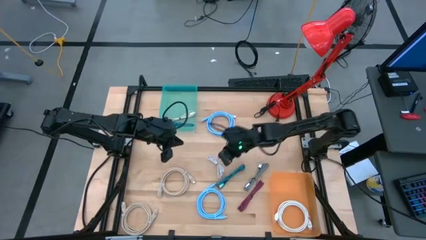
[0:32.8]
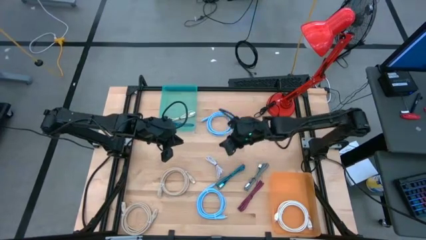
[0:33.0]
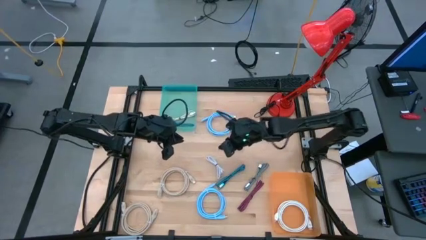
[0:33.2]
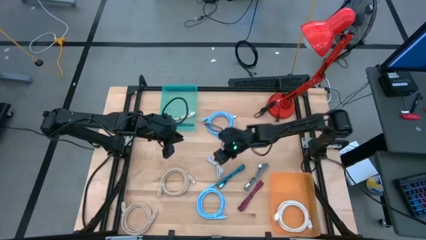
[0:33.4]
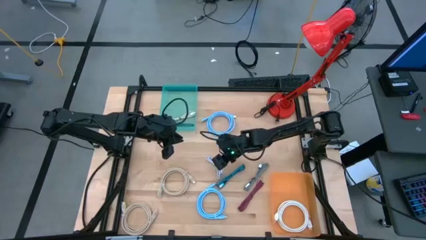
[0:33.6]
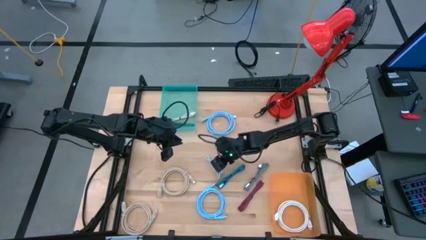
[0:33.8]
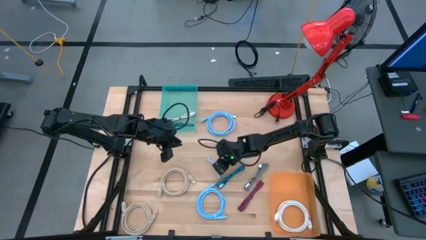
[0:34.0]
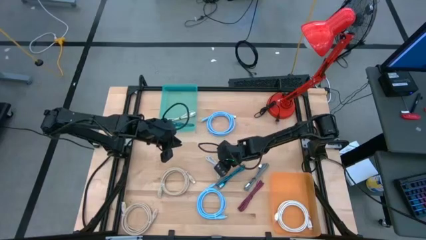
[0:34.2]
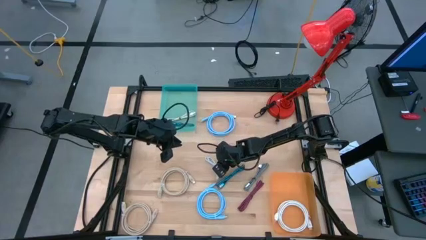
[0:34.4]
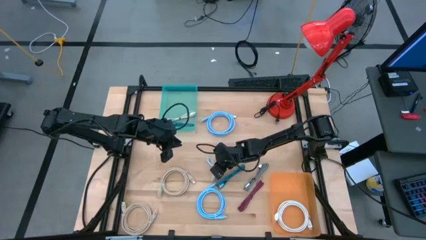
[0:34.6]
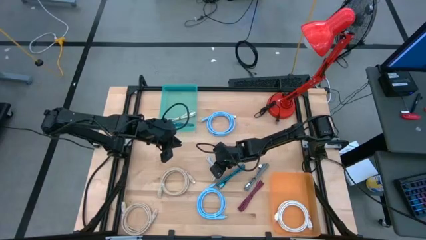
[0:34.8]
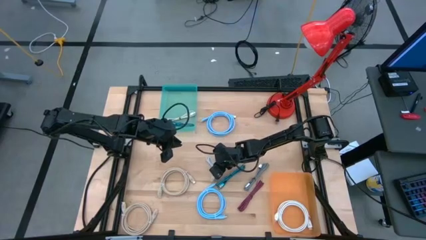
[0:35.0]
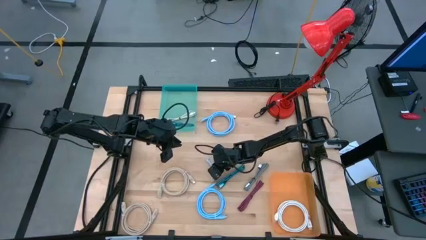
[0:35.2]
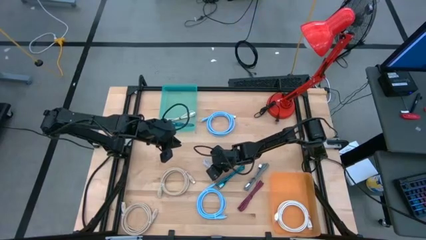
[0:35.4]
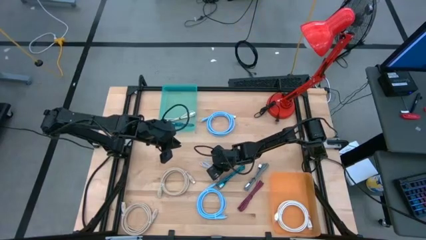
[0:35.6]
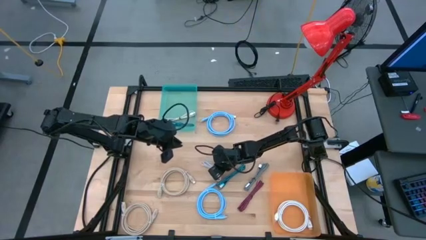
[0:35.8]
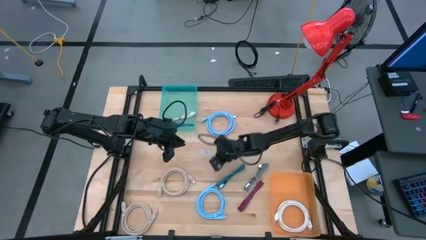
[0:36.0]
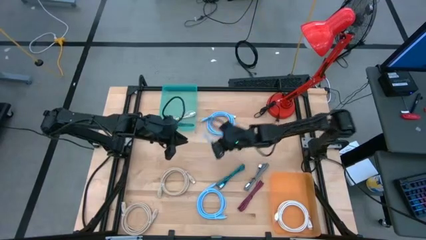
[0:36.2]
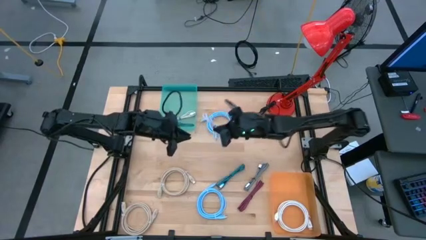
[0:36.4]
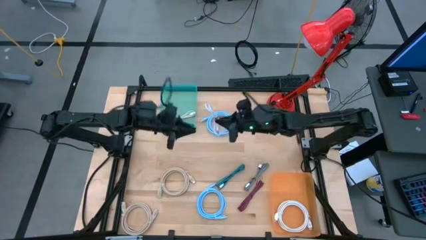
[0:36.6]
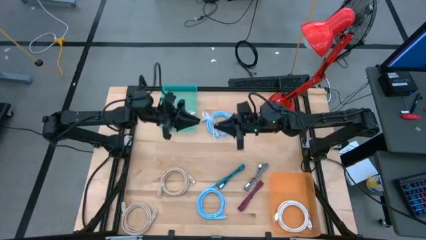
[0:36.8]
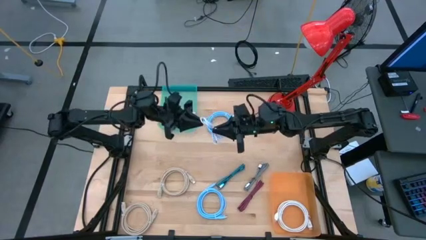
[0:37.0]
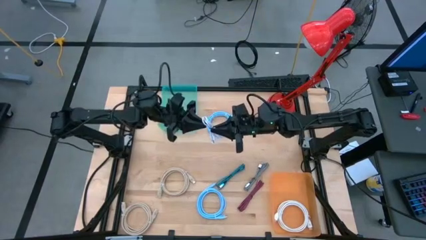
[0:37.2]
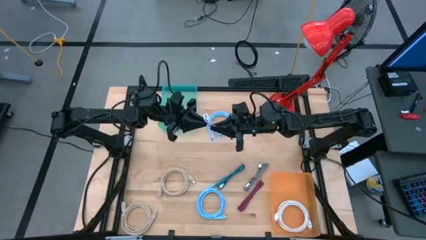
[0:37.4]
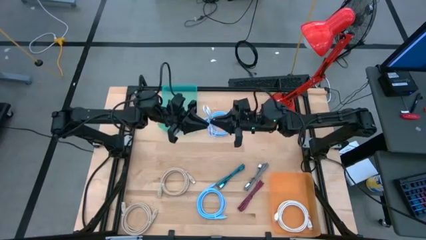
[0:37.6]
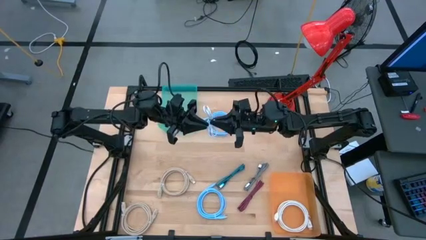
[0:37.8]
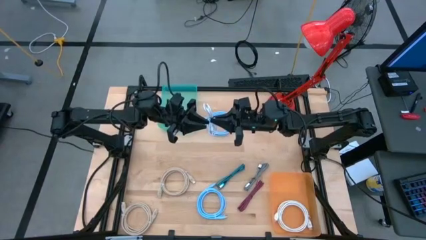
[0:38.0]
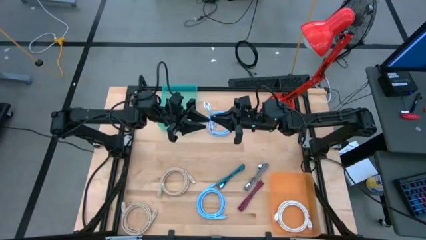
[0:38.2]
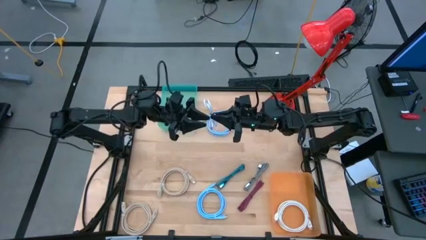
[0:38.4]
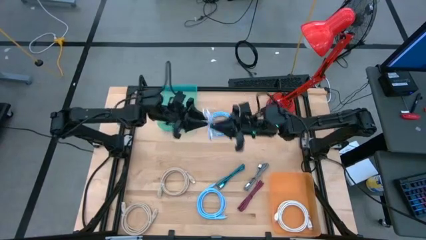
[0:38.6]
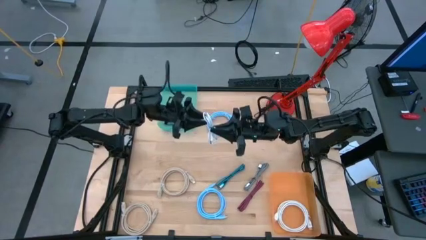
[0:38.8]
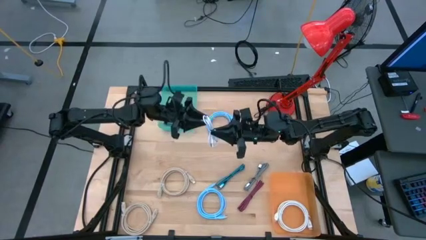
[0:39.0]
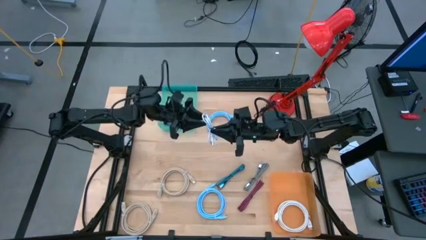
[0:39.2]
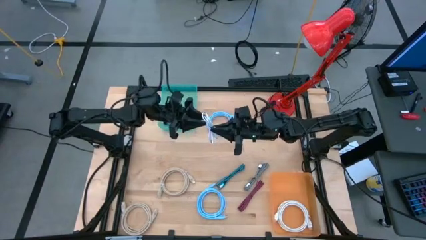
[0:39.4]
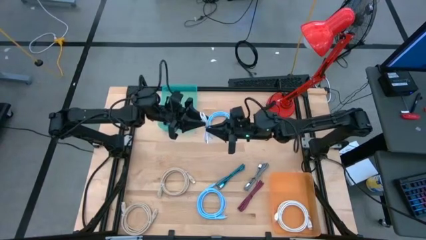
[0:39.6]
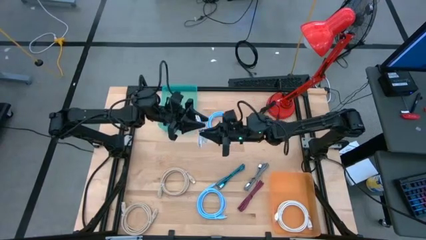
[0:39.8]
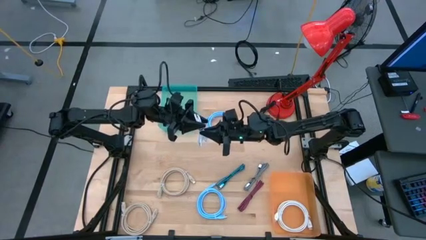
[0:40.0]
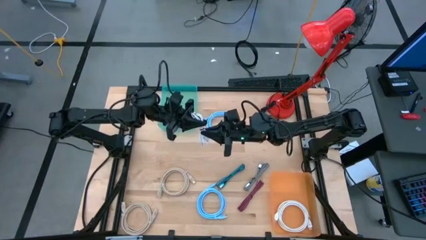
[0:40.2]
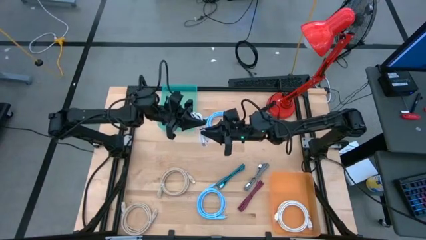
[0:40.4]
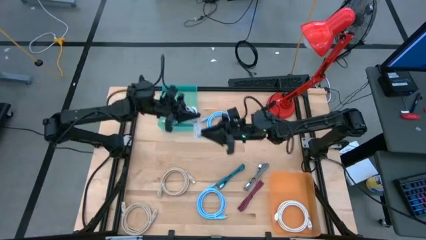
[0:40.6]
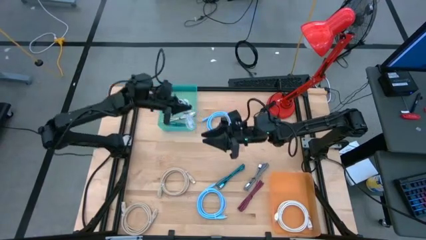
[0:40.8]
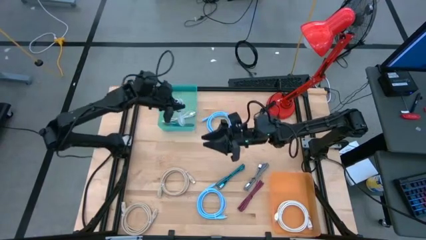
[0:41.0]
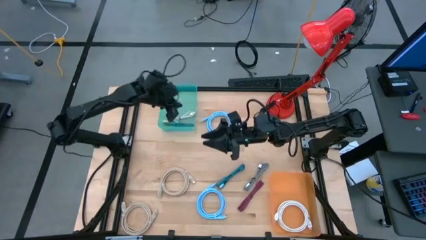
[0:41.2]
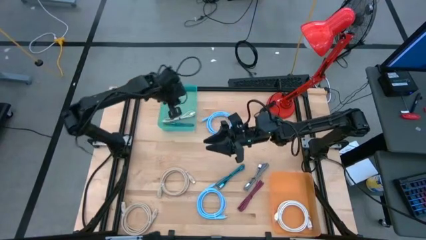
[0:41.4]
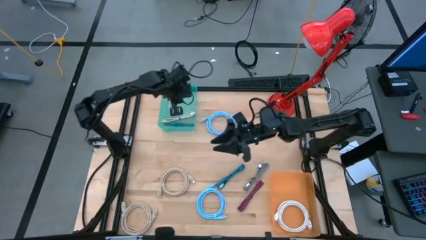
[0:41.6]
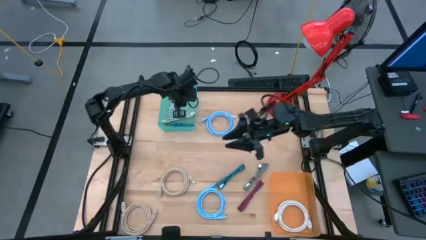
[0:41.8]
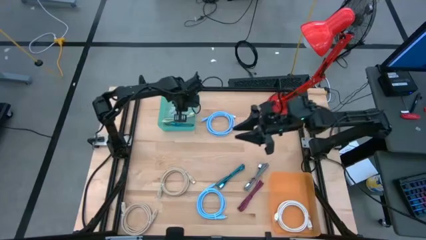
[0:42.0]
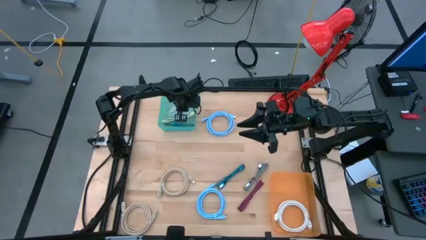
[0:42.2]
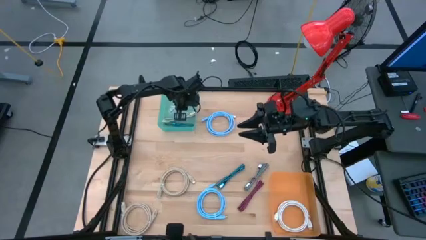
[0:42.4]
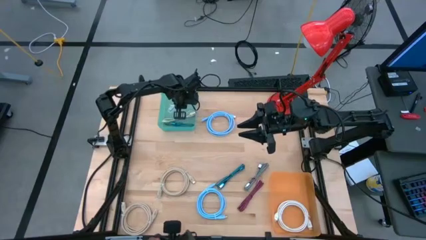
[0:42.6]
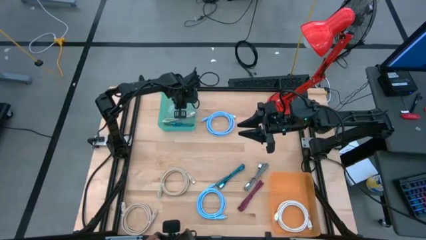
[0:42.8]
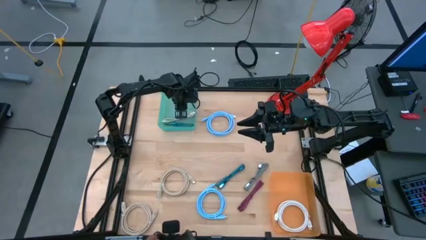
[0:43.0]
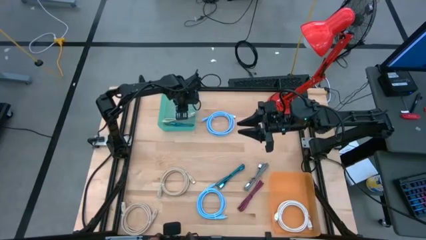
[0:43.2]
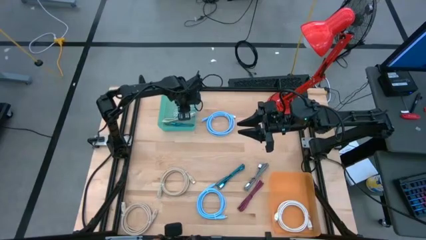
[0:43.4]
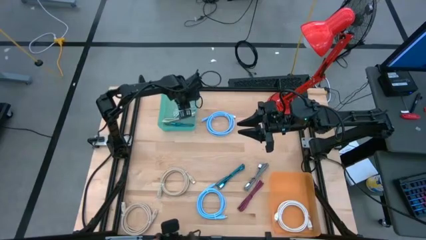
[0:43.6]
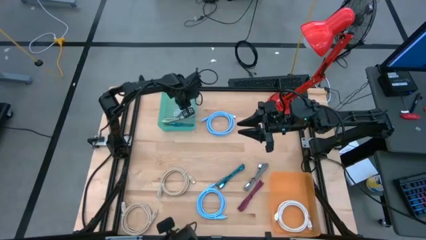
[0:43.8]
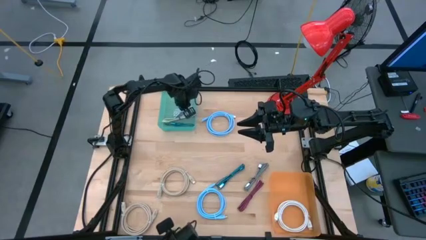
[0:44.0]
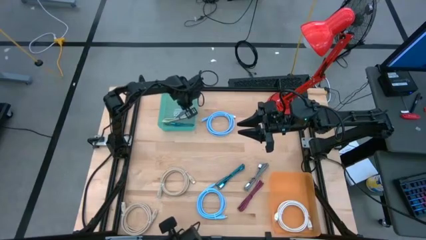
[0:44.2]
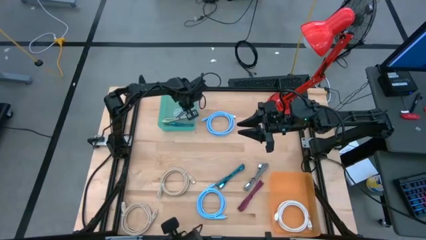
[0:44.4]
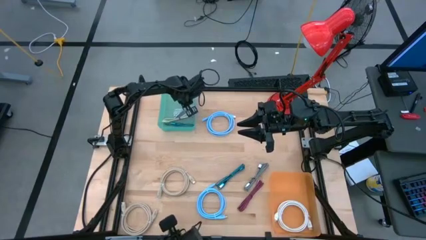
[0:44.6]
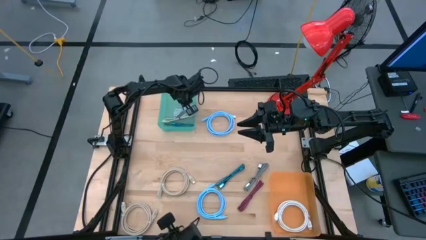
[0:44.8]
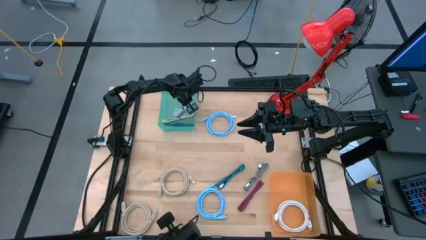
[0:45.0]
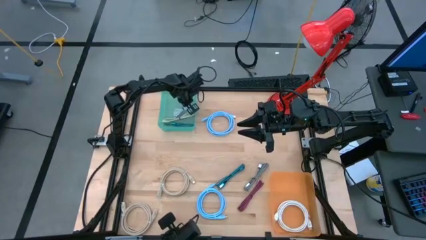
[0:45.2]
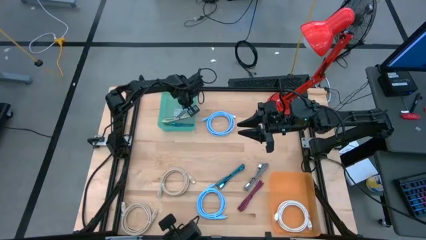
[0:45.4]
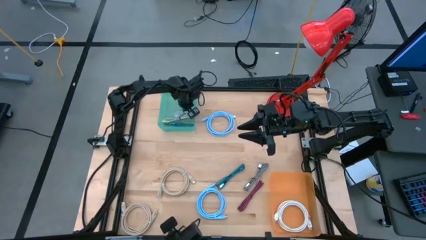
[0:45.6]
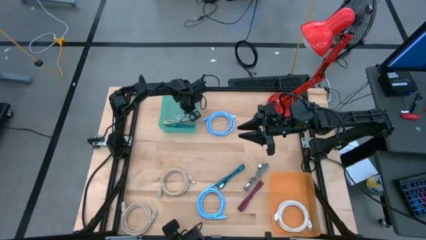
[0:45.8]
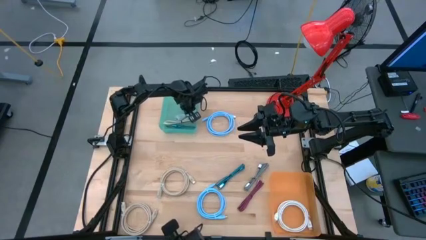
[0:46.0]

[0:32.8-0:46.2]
Task: Pick & Place USB Port
Put the white USB cable into the blue bin

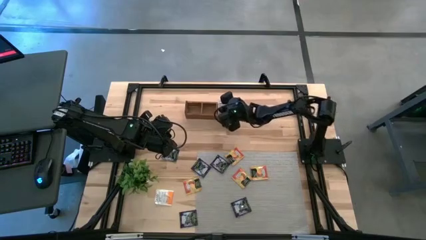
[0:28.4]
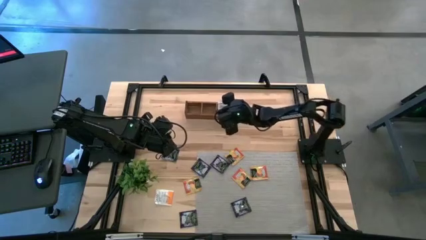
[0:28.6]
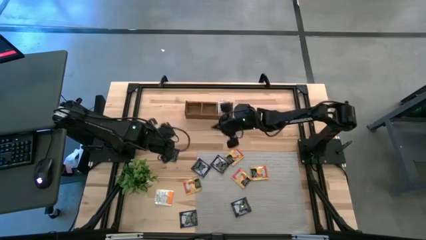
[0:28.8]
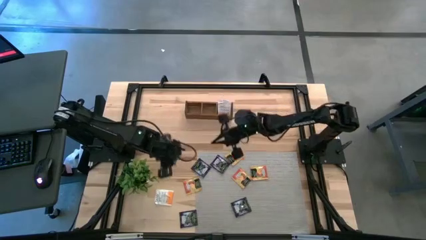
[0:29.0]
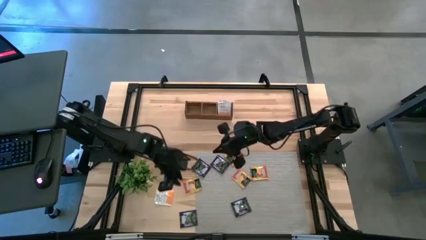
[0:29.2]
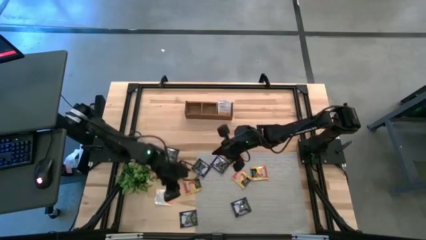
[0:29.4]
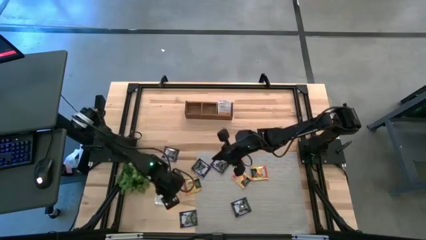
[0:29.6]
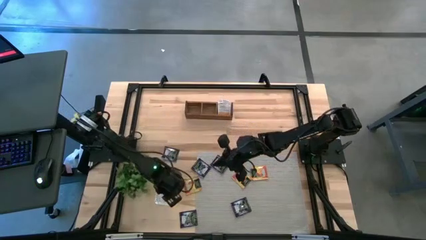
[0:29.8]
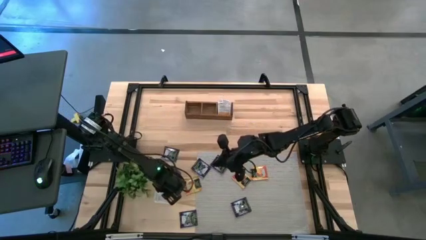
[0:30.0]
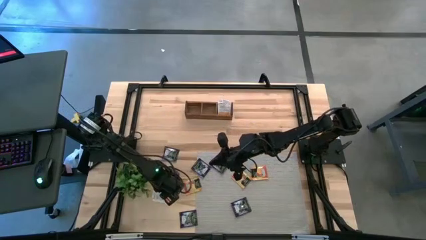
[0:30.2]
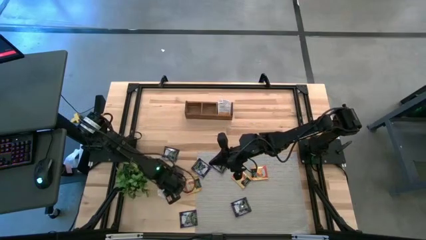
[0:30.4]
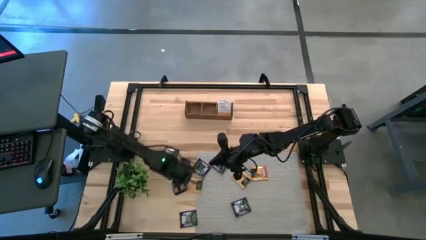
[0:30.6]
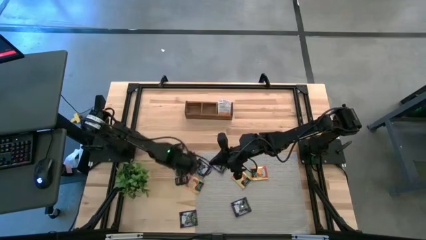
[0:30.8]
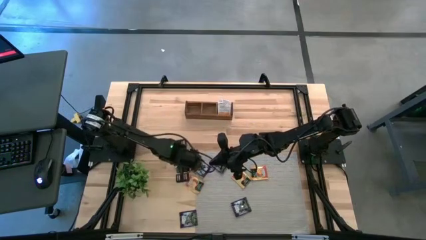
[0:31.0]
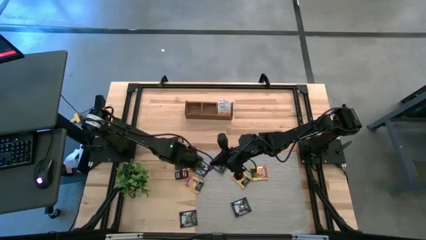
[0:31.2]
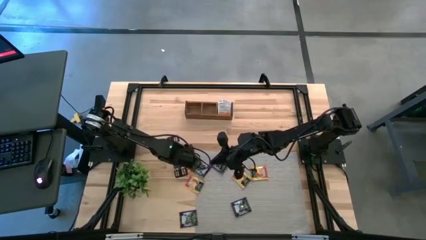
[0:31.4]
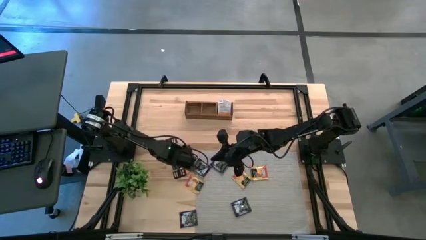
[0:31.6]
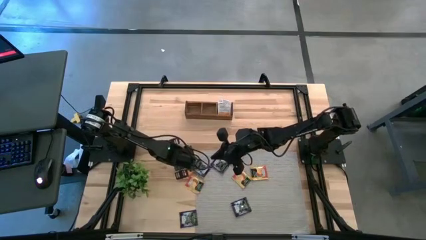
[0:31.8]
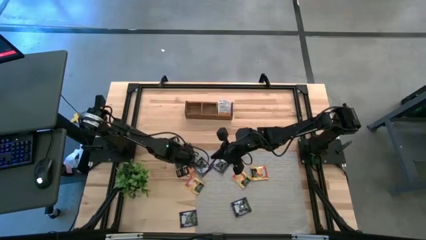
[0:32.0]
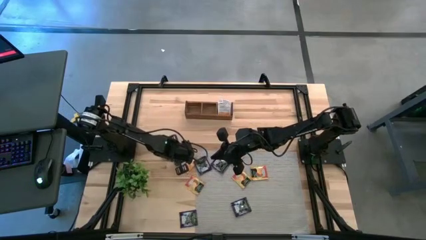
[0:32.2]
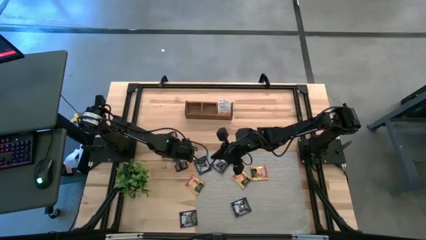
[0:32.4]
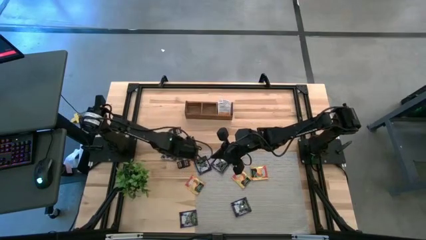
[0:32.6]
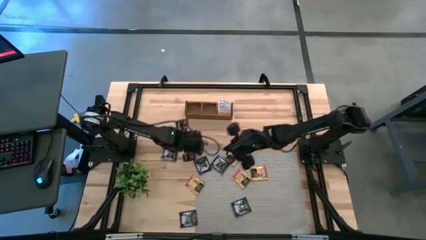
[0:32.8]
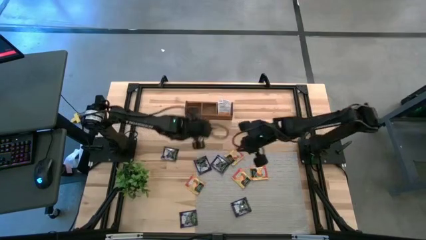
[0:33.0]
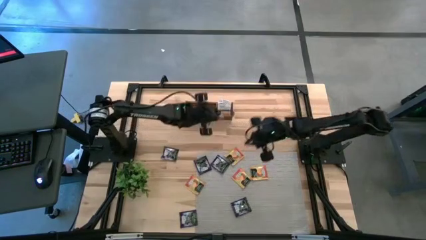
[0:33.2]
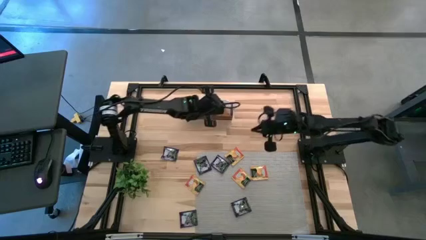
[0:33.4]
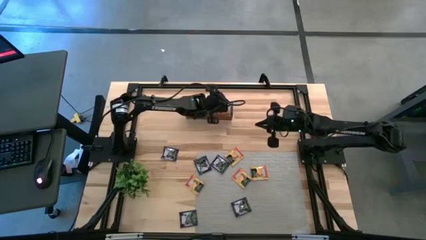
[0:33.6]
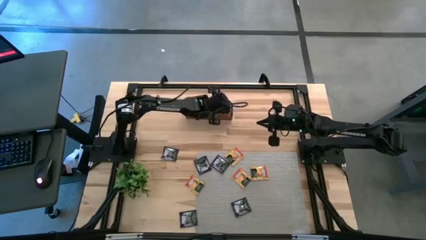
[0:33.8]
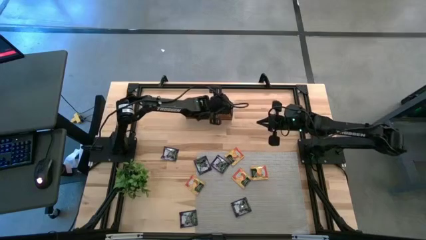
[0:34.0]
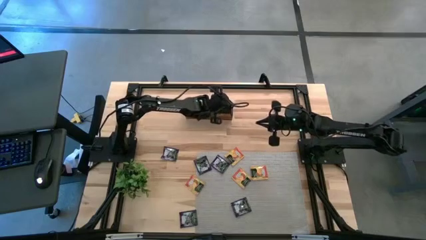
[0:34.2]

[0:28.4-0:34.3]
Task: Pick & Place Tea
Put the white tea bag into the right section of the wooden organizer
